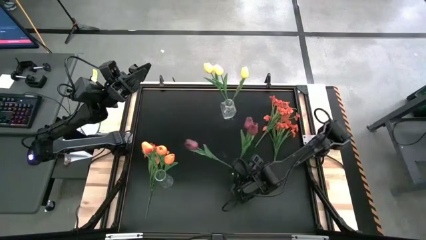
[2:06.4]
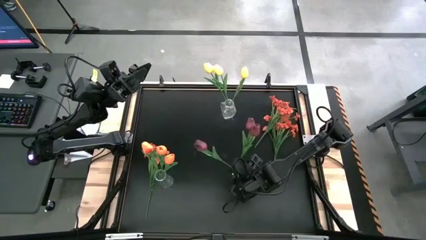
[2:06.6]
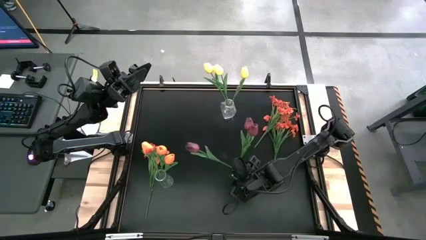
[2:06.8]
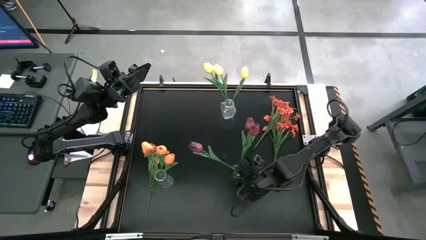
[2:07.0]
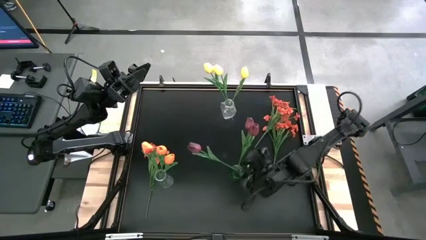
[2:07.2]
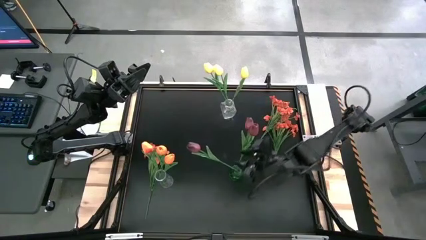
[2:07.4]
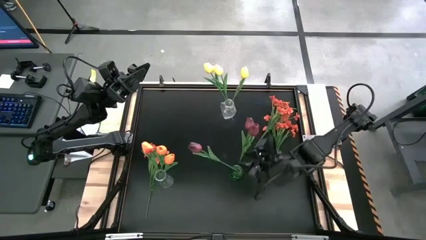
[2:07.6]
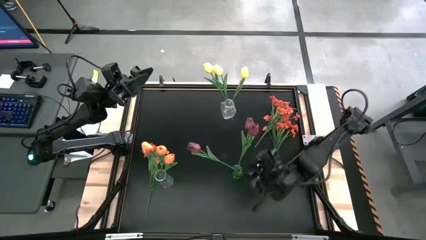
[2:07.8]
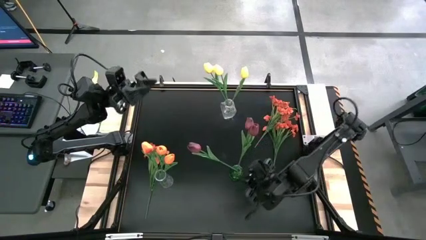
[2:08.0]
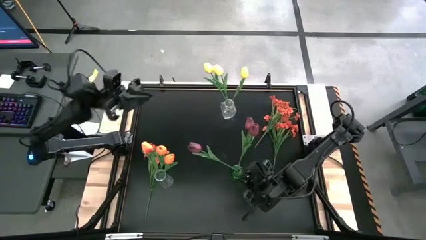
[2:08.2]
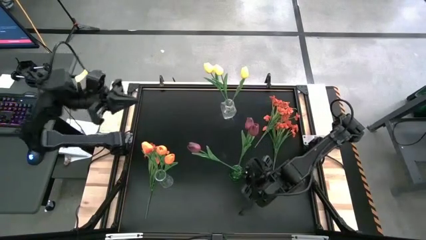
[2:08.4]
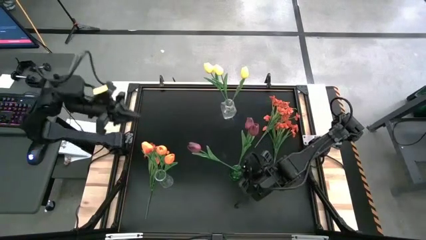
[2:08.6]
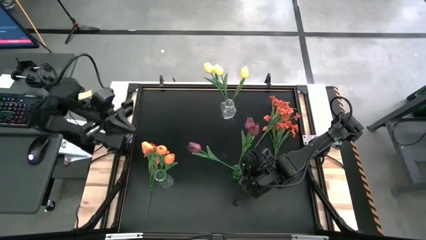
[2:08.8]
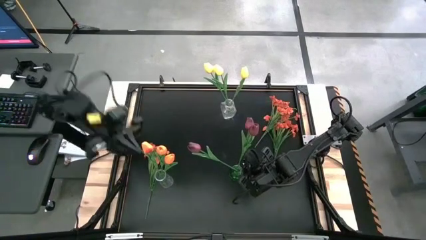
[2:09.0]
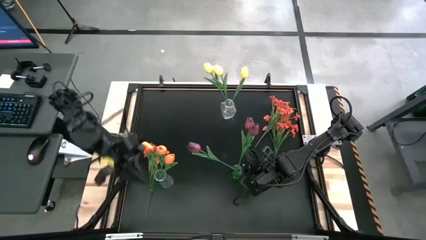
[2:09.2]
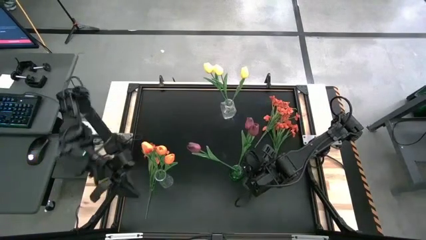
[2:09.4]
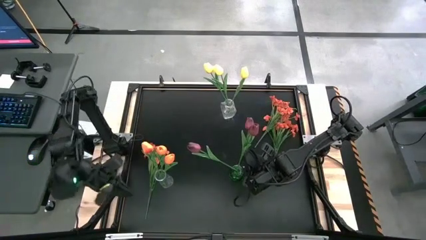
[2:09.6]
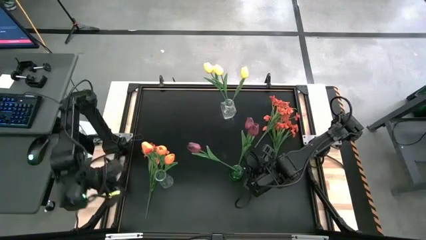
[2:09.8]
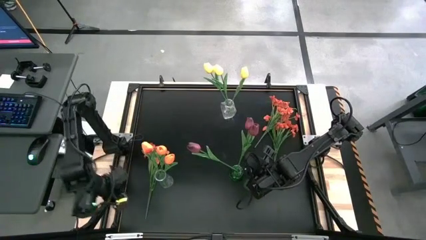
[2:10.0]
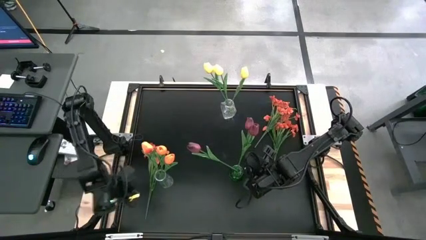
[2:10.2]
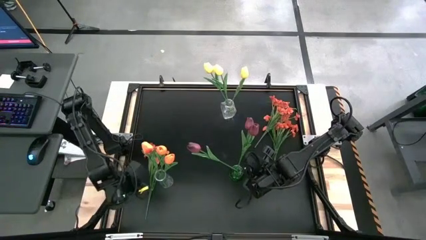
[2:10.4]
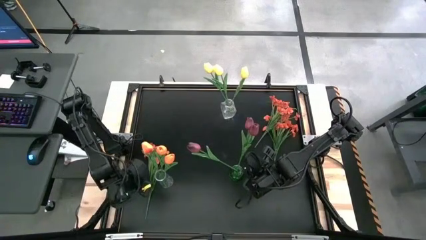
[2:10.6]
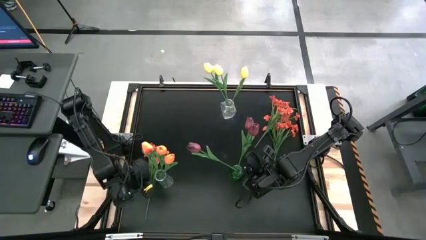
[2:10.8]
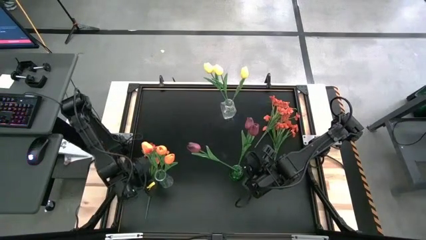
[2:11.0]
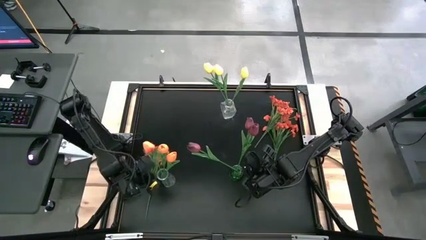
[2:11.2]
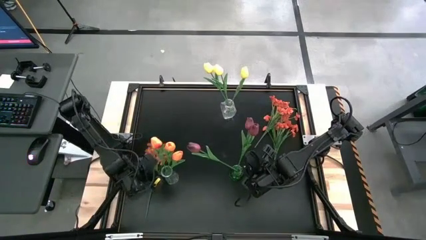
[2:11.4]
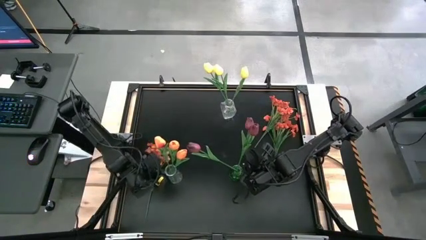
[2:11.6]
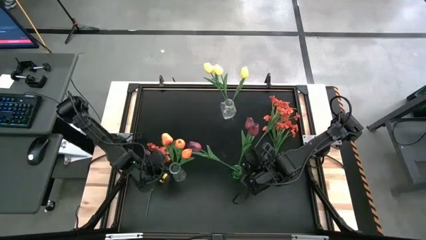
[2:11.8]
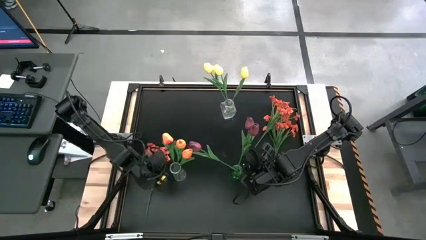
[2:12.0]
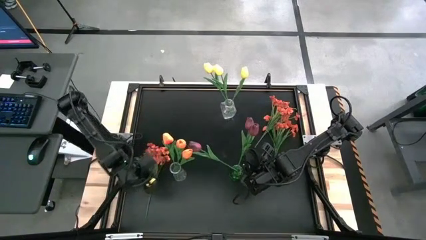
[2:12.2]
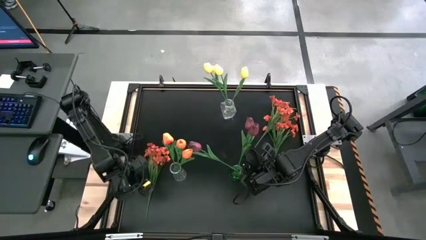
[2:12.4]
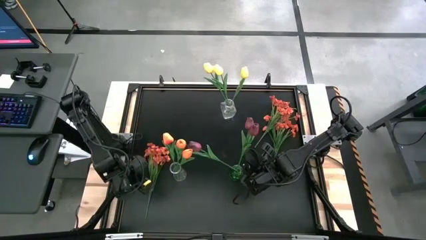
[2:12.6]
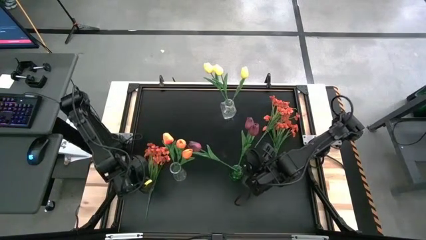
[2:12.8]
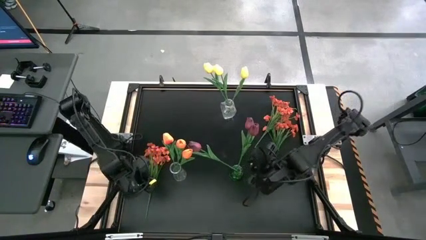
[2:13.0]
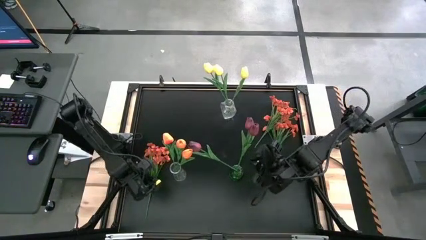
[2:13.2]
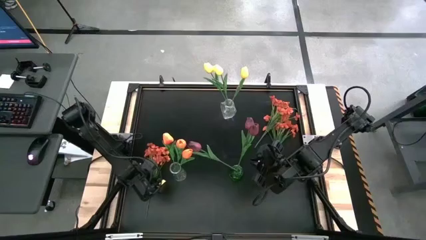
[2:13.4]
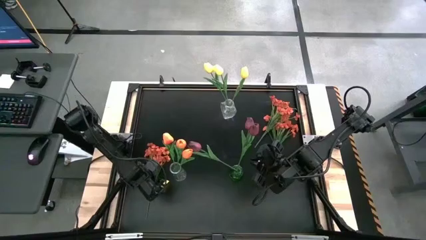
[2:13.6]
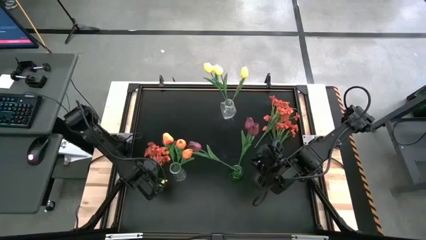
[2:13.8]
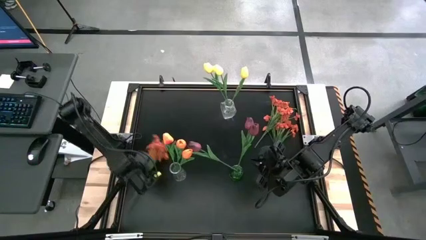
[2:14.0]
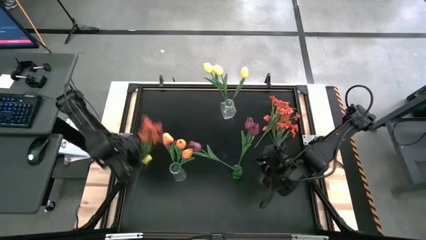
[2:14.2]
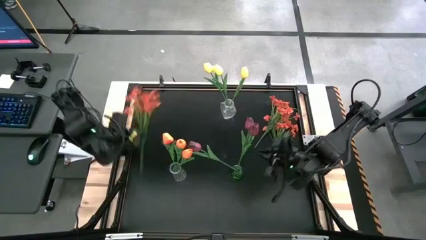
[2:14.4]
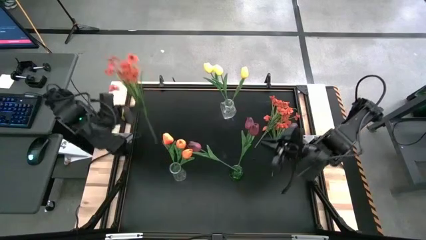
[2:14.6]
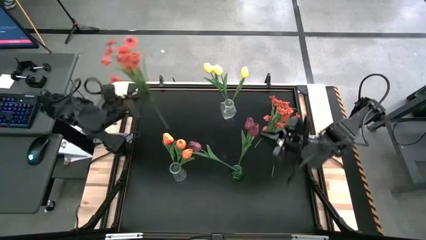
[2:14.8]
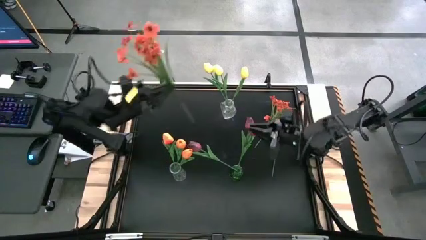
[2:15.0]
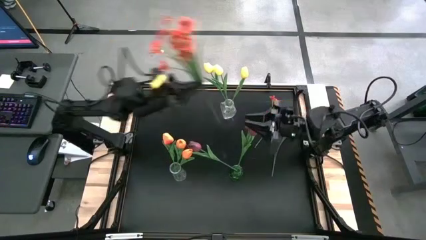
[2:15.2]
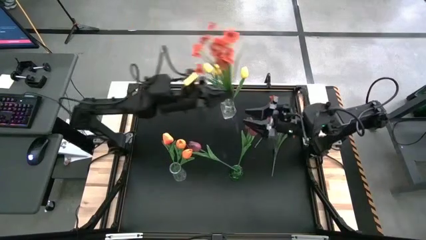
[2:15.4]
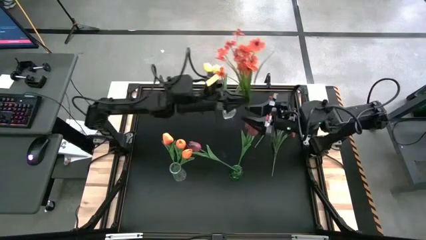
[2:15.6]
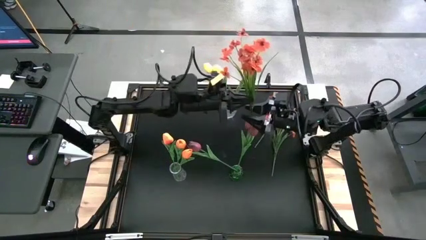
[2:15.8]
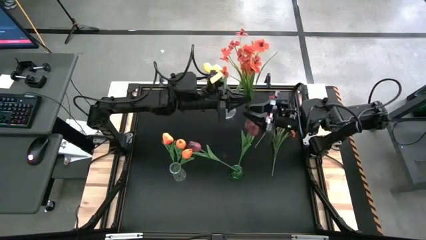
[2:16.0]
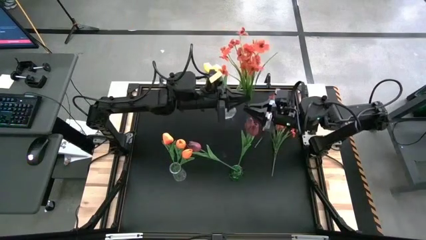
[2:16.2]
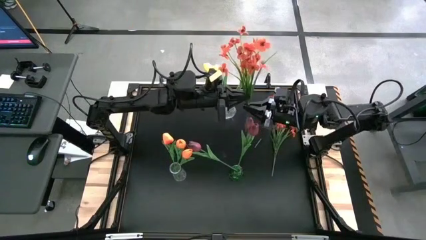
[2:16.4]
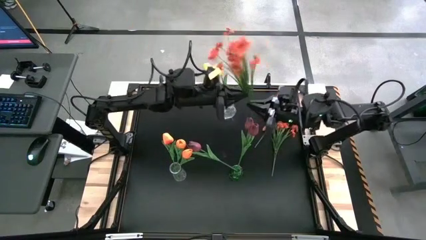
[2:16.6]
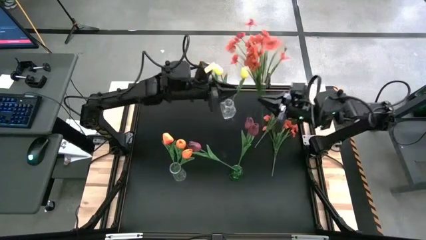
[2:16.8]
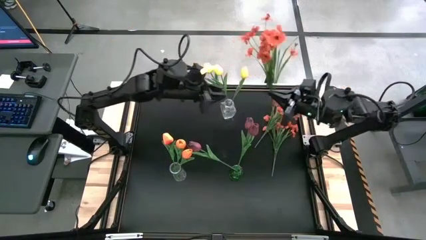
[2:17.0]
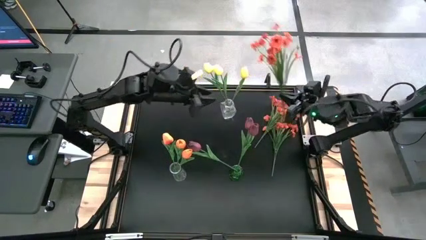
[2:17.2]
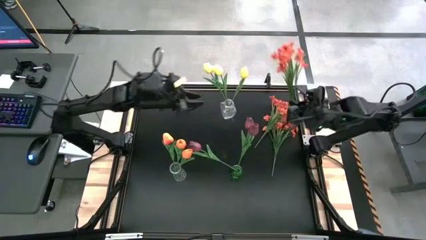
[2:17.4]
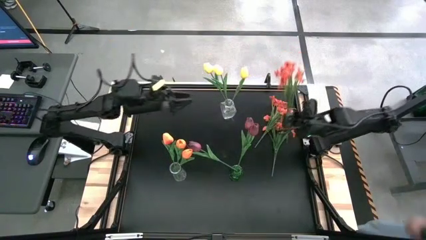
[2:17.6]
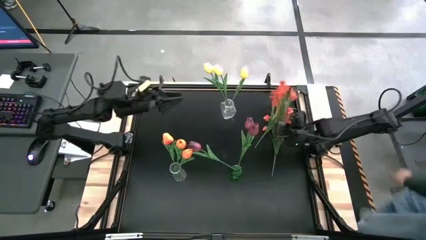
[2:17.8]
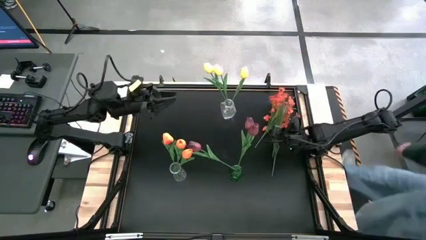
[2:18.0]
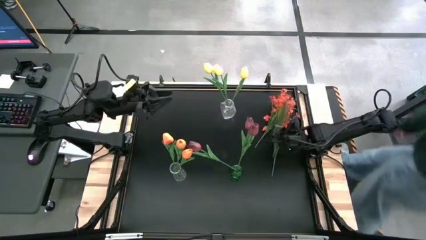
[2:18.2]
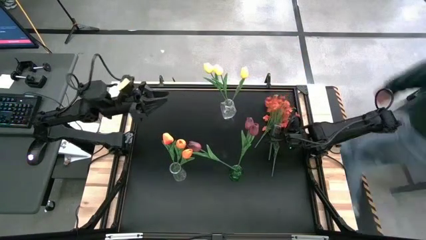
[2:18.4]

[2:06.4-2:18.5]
Task: Sort flowers into vase by color
Move the orange flowers to the middle right of the table

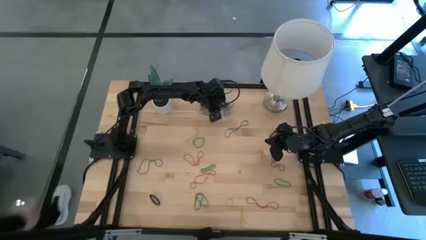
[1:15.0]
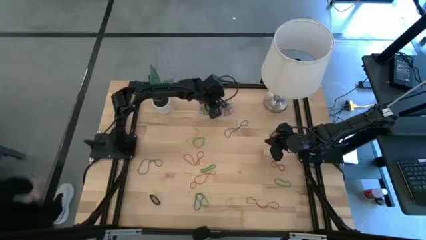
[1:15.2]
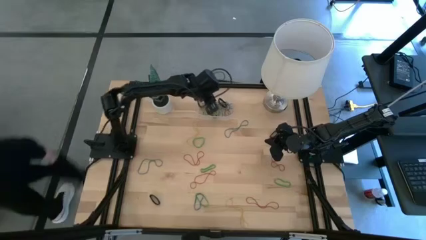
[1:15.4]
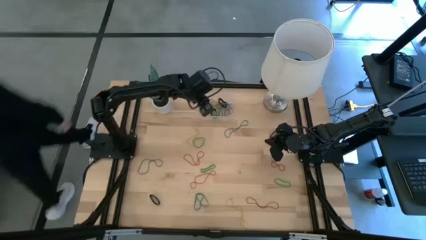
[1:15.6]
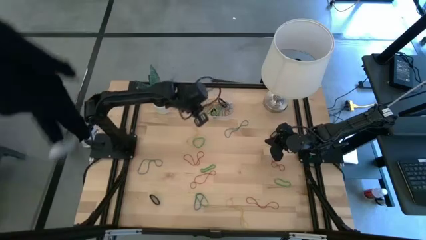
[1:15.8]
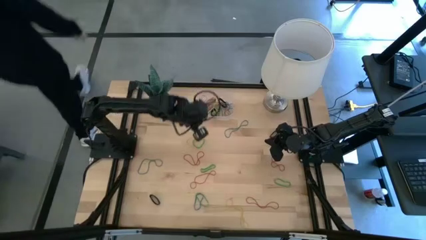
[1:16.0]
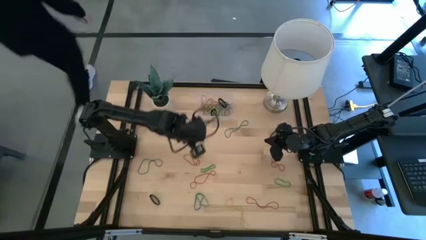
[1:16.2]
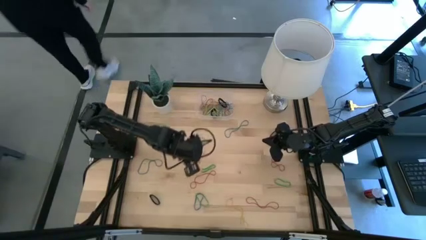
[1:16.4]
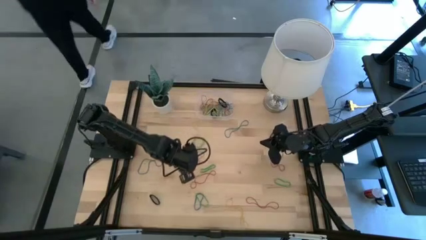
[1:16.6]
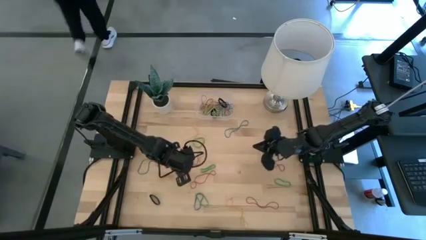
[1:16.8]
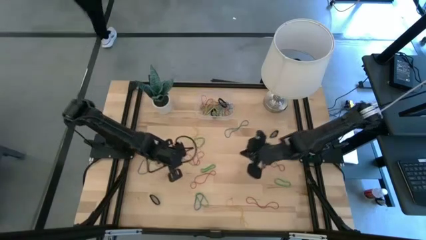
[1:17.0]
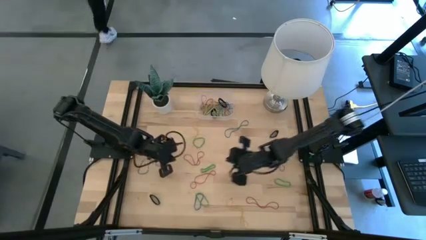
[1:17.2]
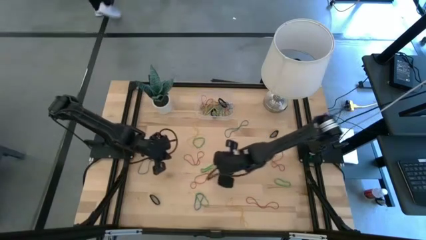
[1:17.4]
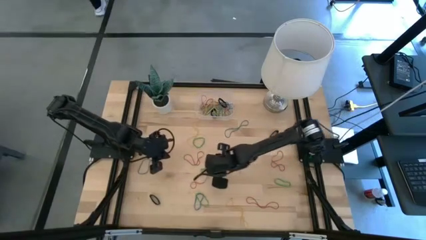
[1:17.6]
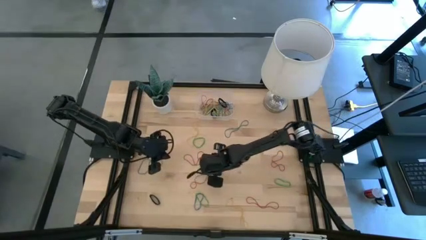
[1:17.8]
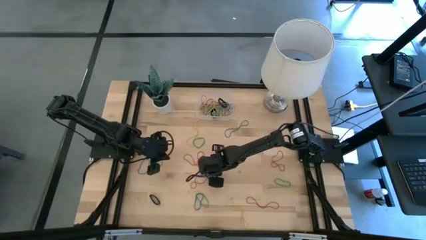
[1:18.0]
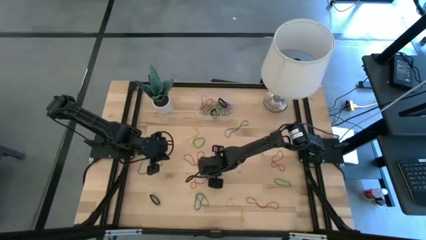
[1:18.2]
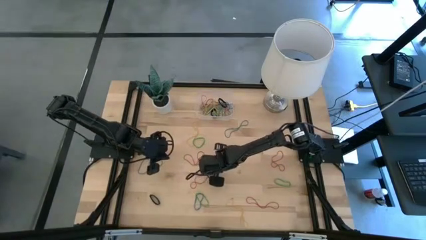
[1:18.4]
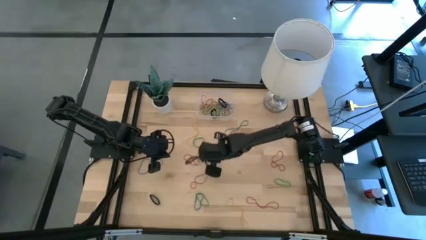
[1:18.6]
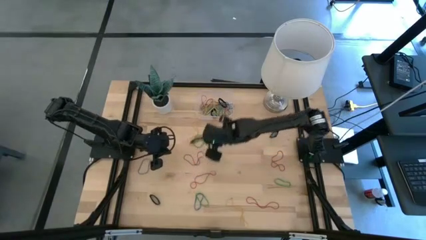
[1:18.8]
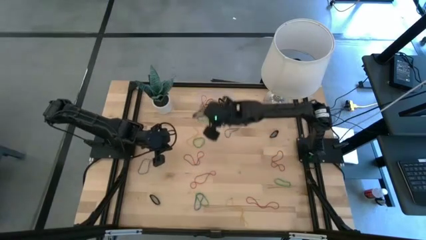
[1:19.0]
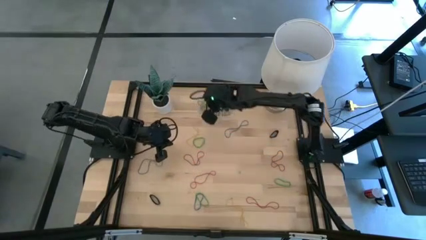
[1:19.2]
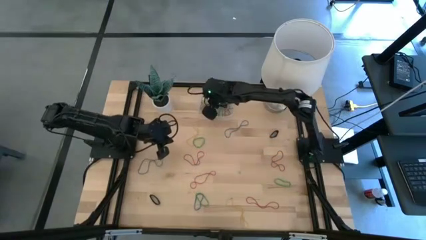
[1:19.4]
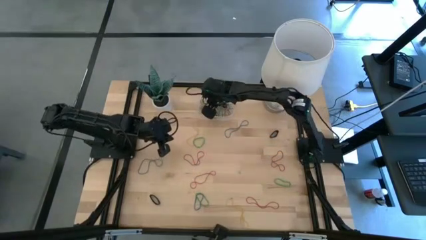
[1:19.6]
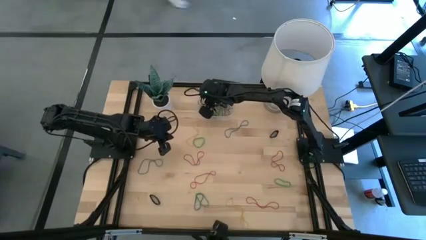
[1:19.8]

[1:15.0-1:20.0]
Task: Pick and place rubber bands into bin
Put the green rubber band into the transparent bin
